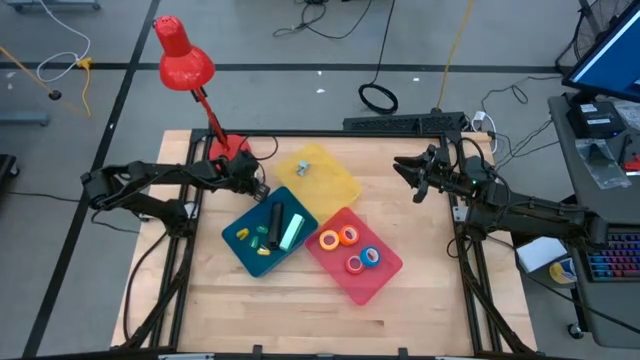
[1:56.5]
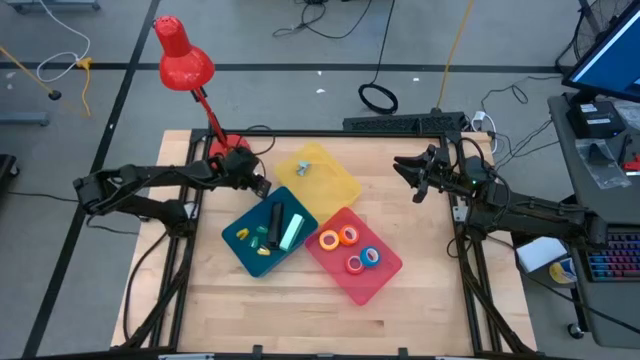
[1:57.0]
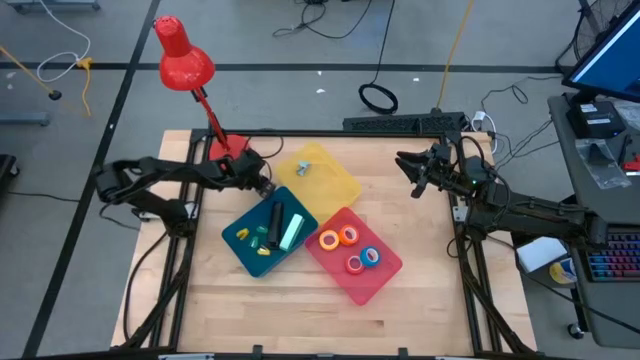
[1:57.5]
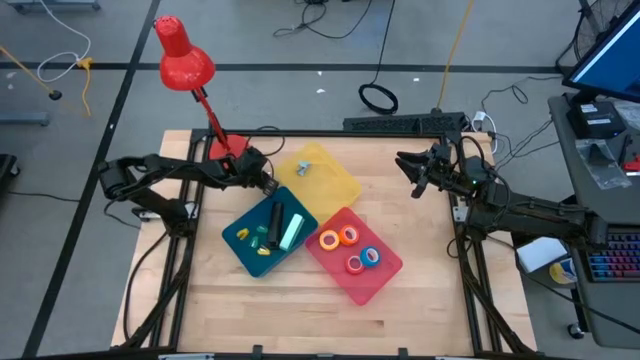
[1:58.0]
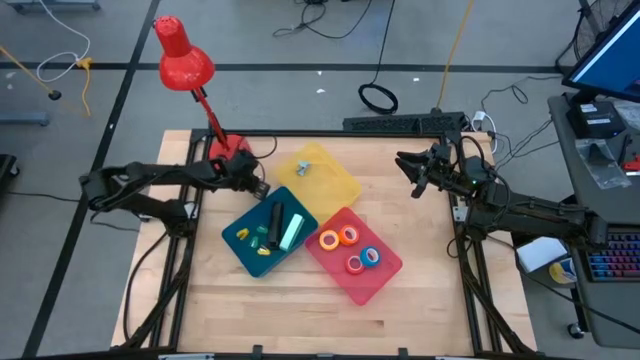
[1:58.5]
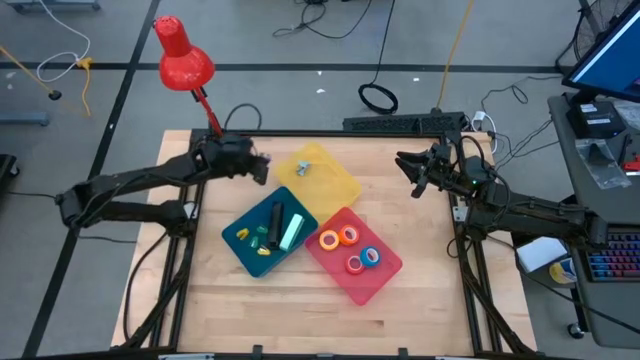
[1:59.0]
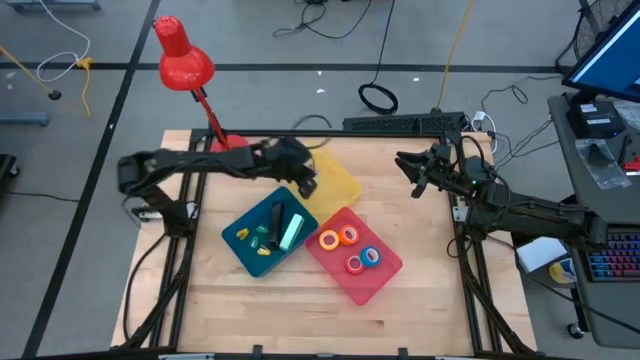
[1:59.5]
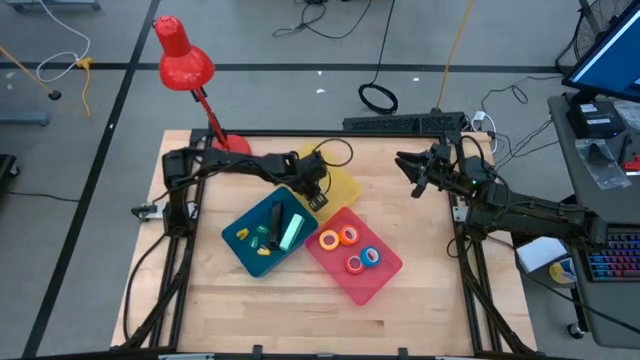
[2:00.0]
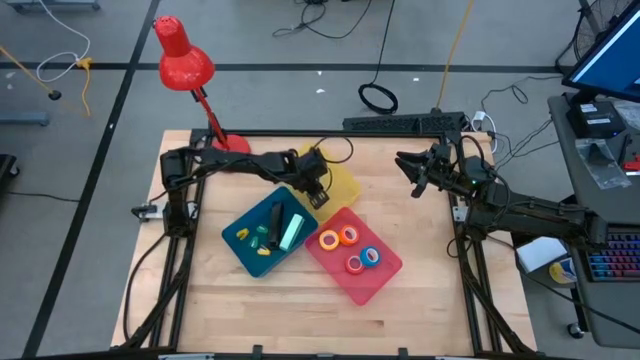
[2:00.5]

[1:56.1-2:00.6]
Task: Pick and place Stapler, Stapler remover, tape
Put the violet staple remover into the yellow bin

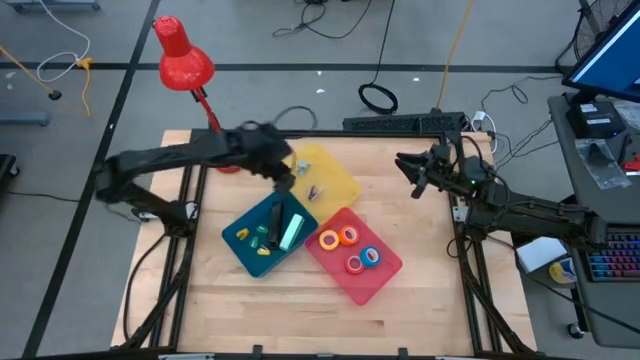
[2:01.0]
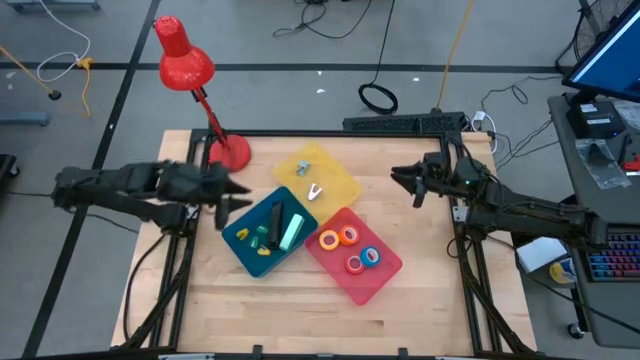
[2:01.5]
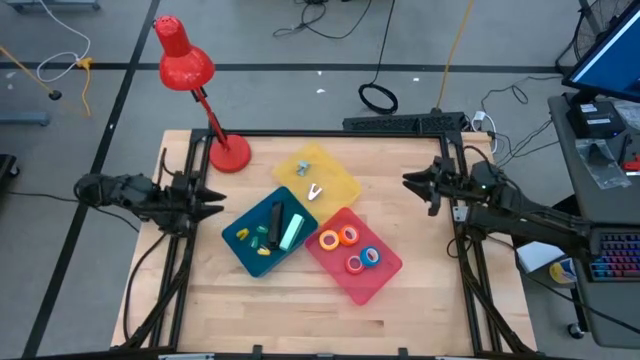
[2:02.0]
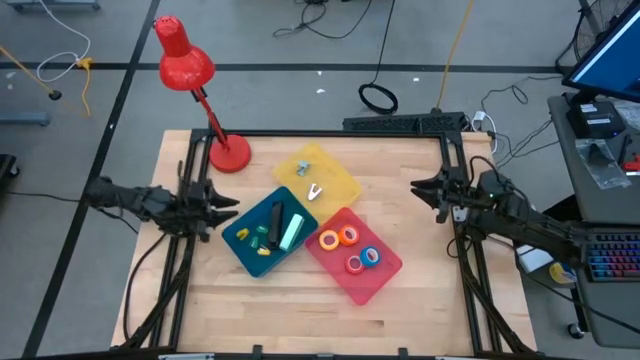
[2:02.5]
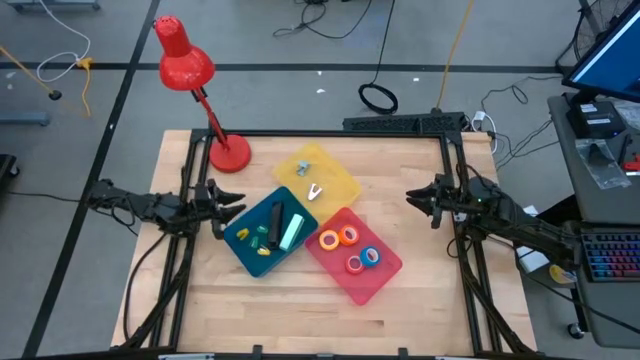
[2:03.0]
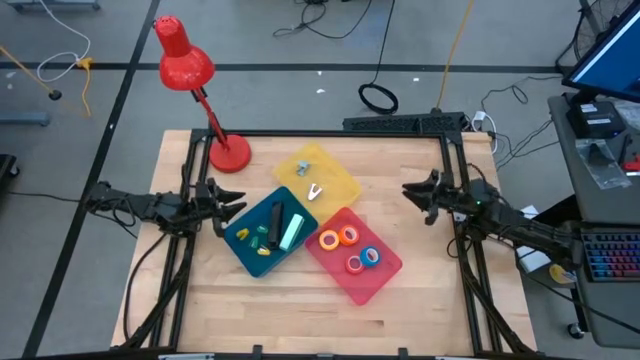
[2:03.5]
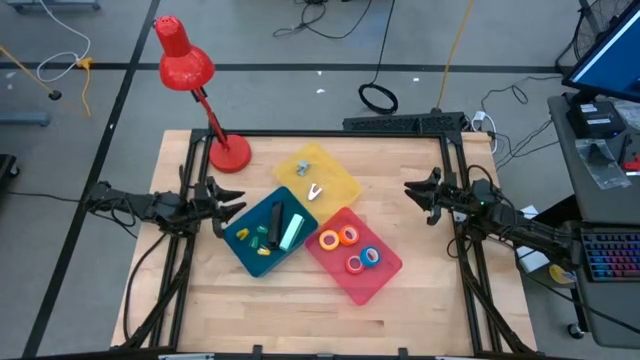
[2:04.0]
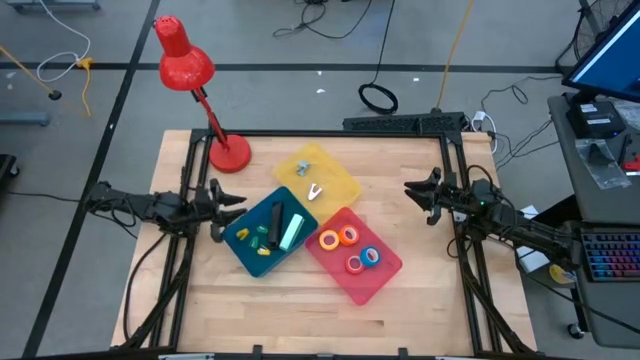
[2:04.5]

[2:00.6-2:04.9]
Return to Home Position

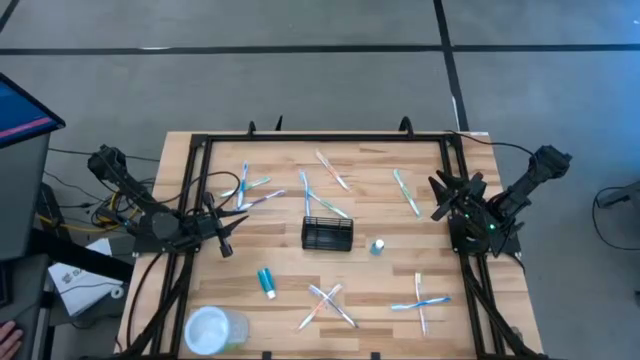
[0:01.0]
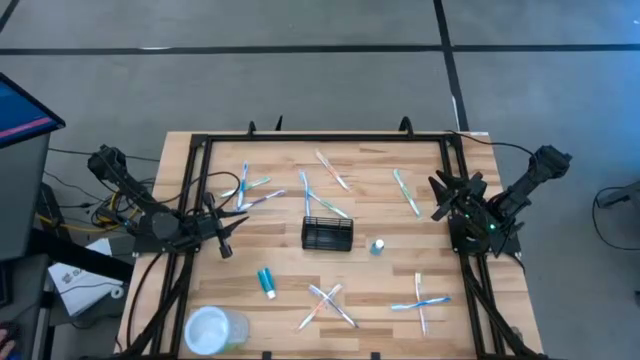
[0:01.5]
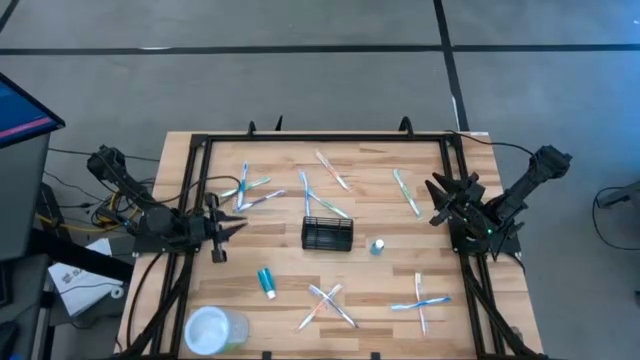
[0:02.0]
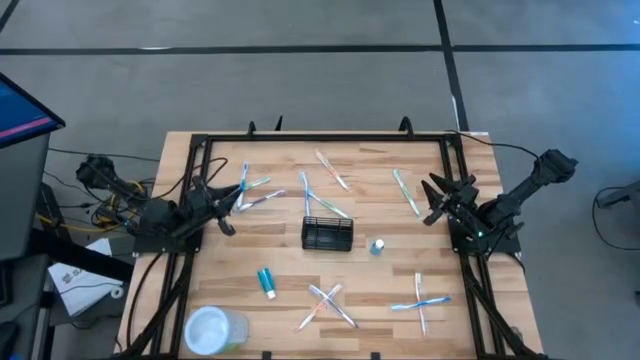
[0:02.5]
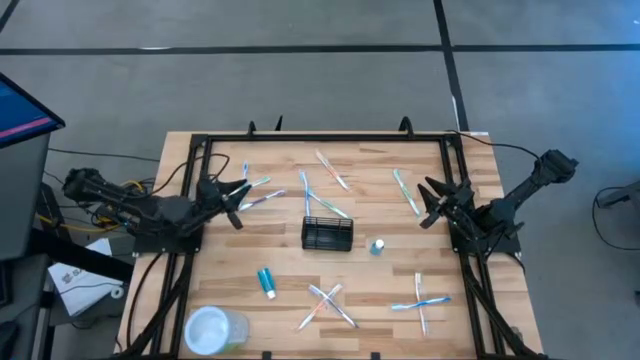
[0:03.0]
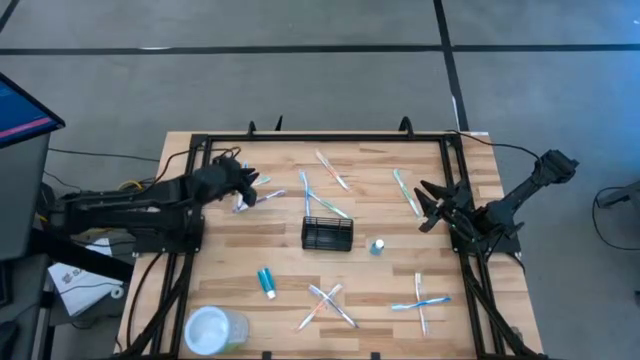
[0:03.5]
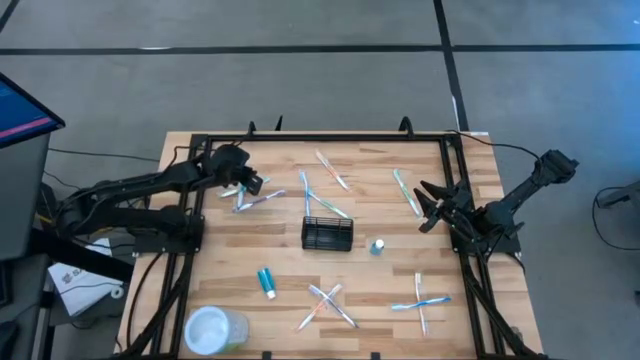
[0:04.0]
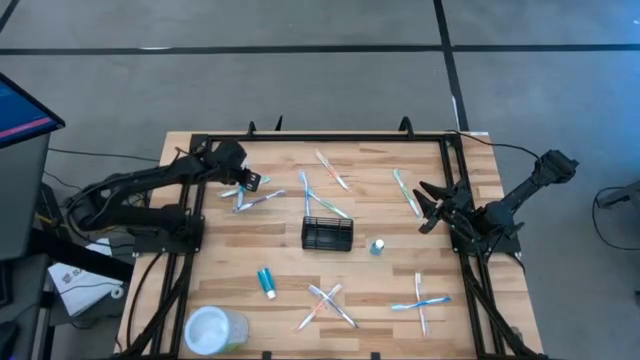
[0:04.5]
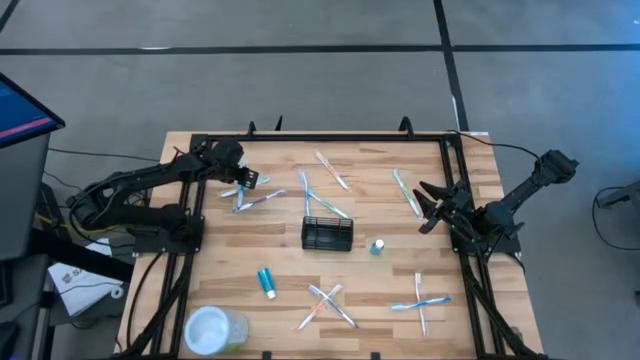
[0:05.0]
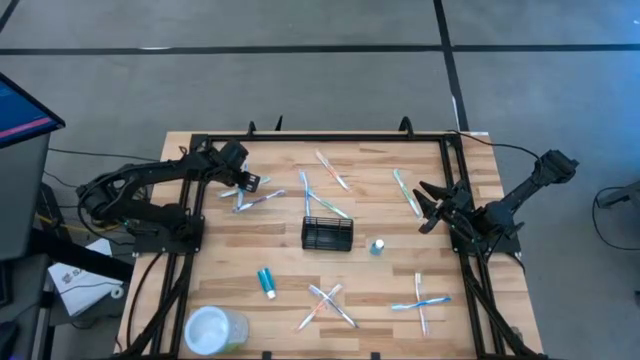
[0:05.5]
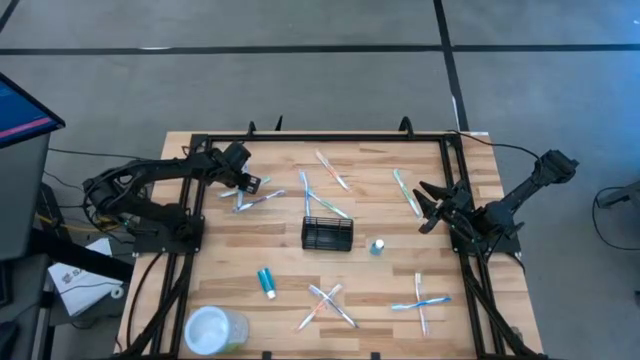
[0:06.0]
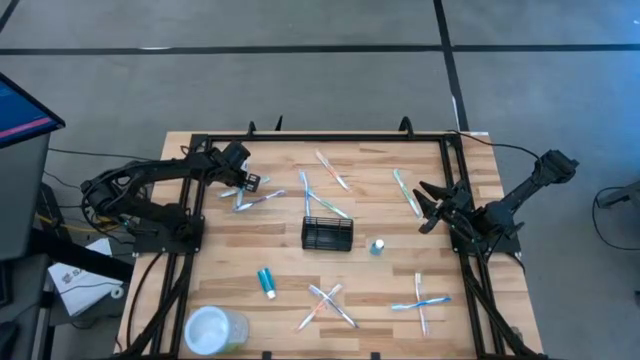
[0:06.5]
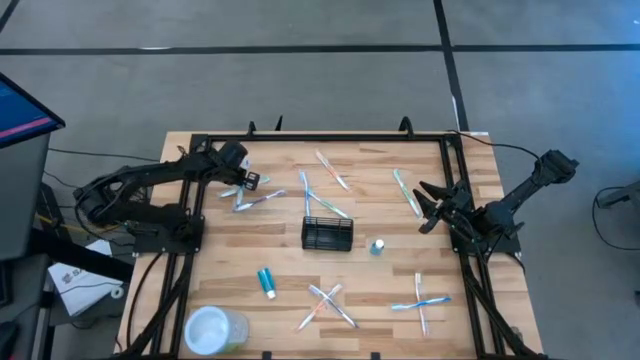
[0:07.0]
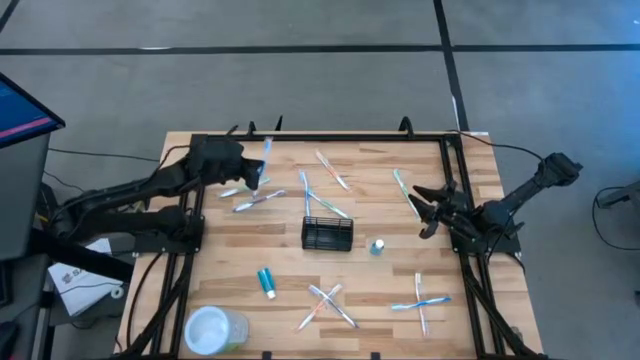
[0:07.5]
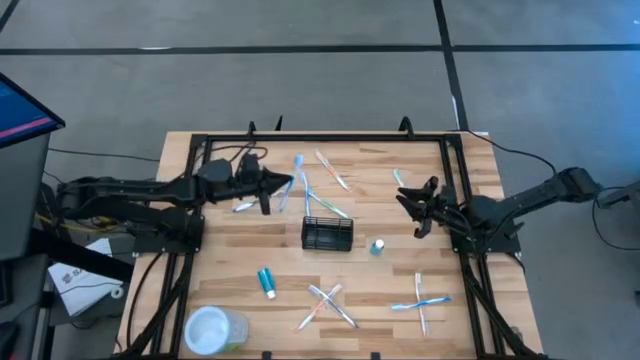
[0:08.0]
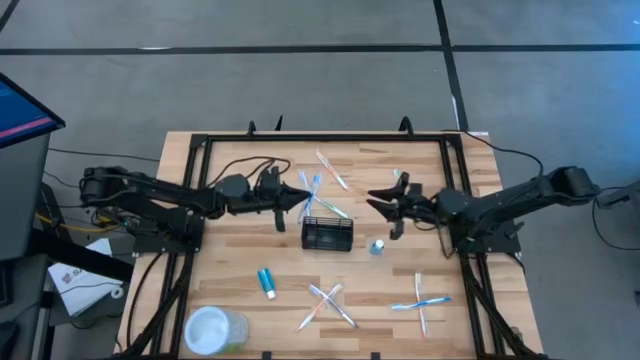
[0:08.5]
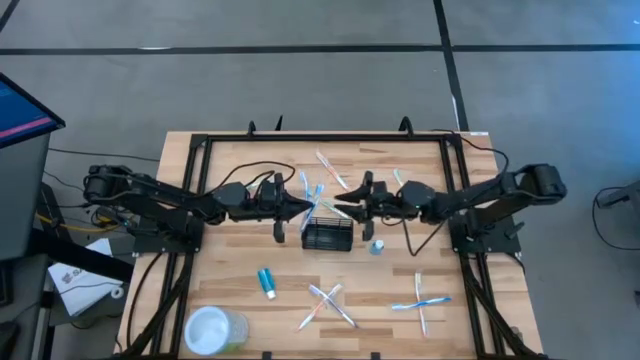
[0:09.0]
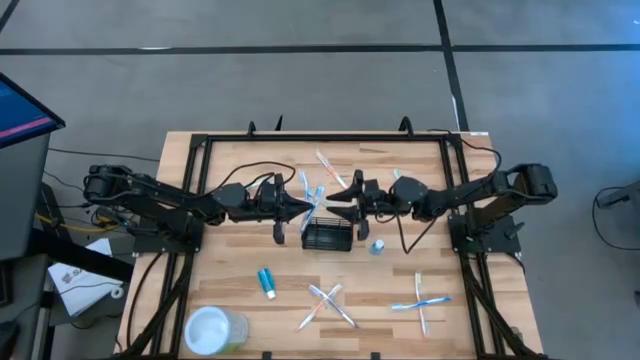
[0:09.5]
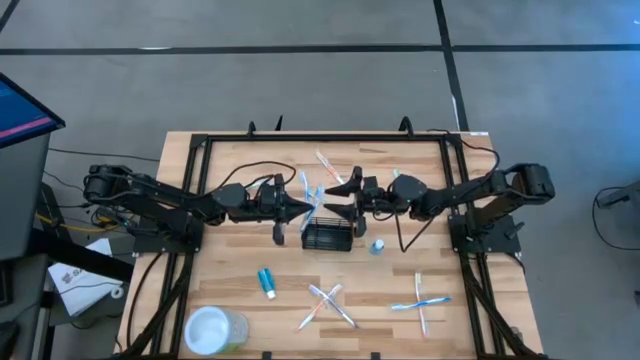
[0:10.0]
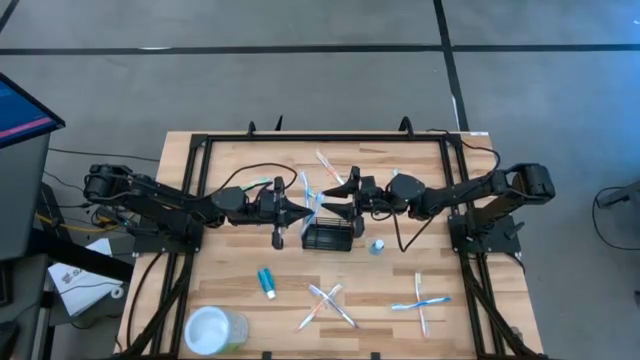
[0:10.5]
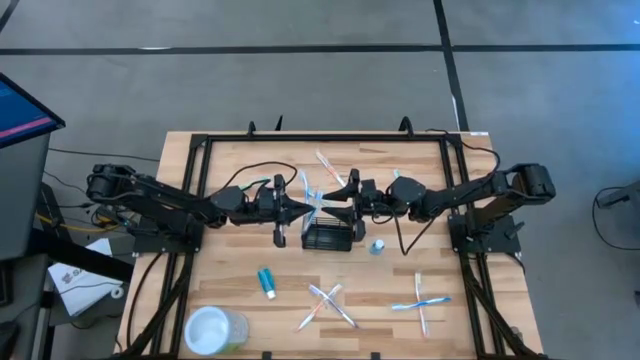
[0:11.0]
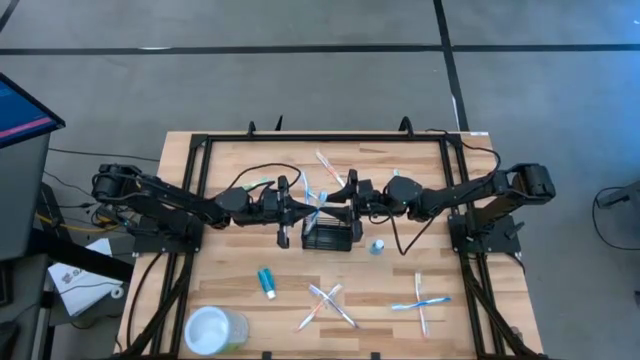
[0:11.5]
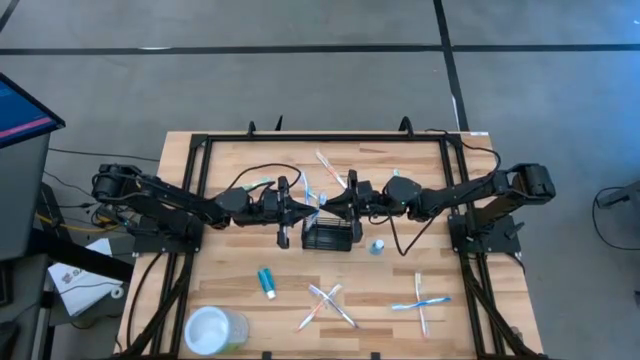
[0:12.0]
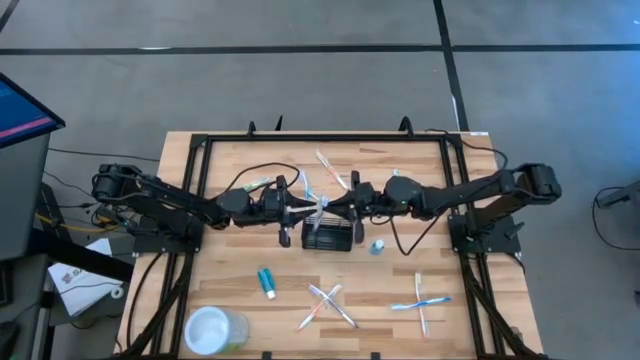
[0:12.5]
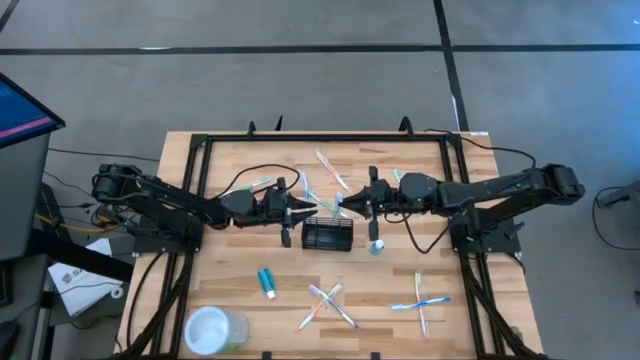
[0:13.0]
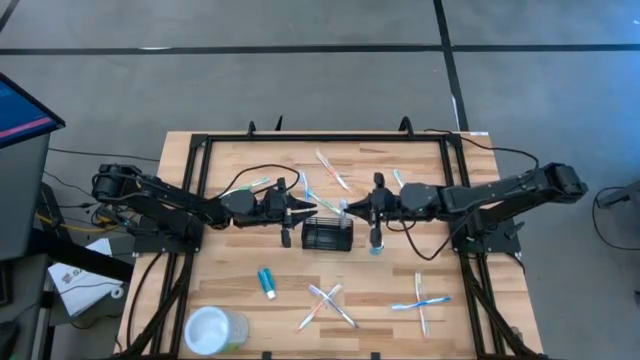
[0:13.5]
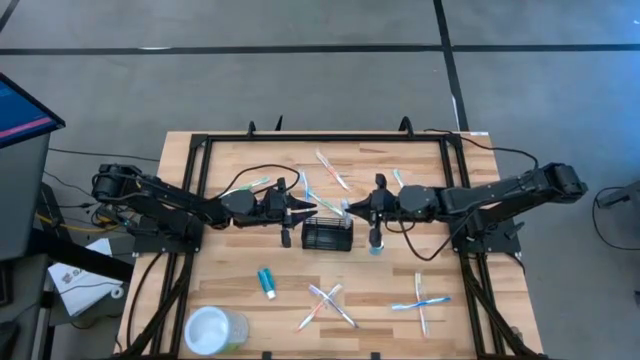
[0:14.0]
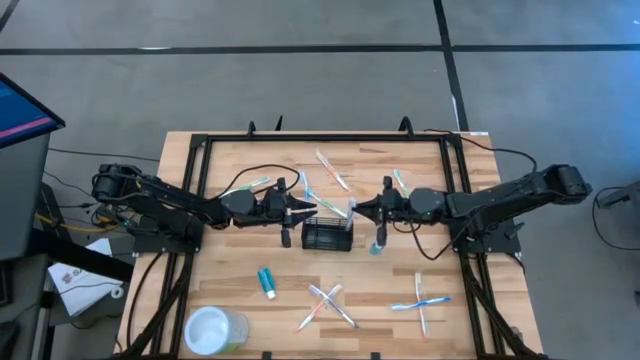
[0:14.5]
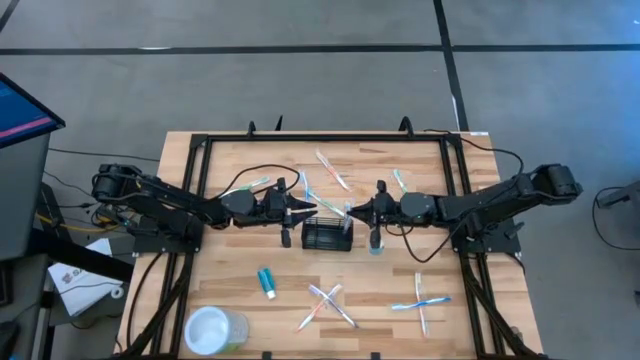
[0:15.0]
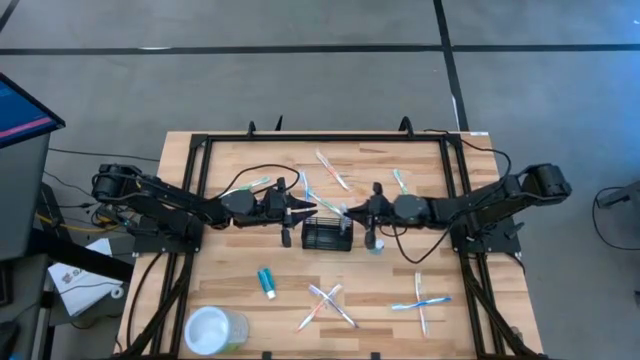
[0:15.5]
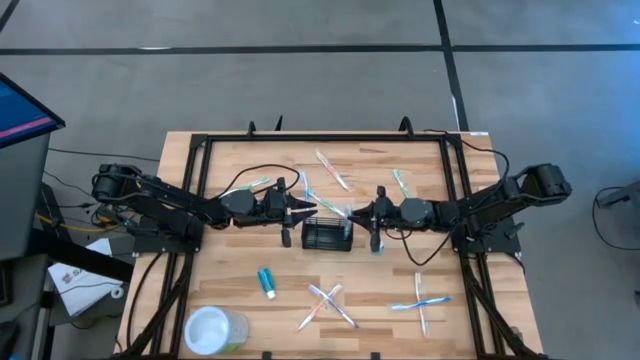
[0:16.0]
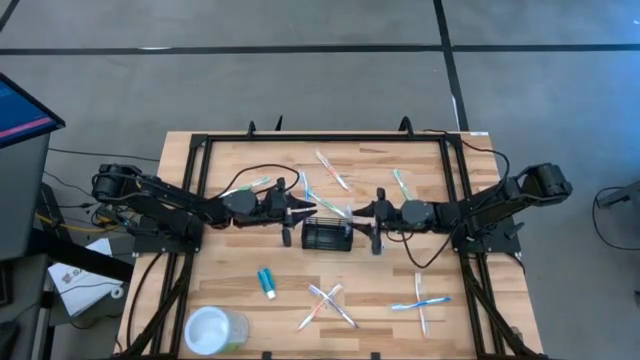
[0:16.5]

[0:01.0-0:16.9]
Task: Pick & Place toothbrushing station
Put the top left blue toothbrush into the wire organizer
